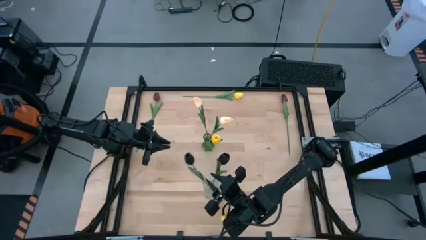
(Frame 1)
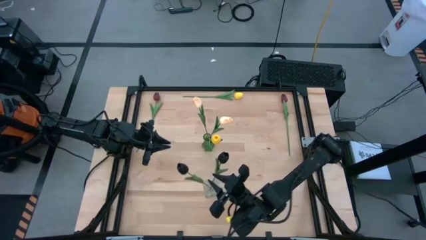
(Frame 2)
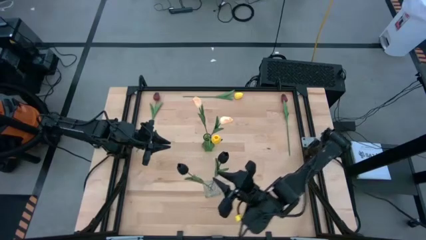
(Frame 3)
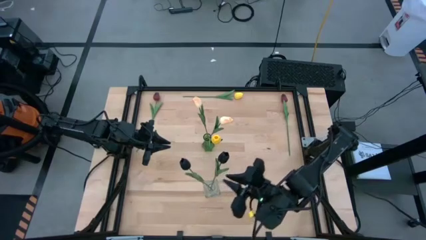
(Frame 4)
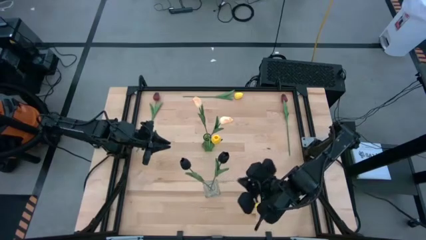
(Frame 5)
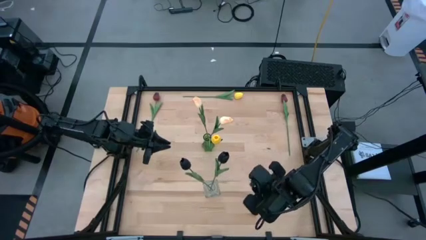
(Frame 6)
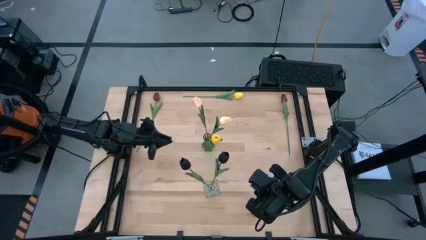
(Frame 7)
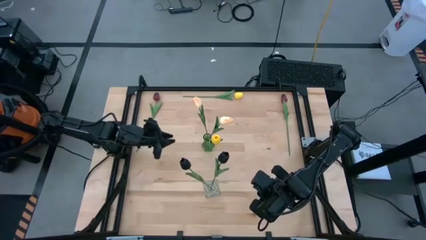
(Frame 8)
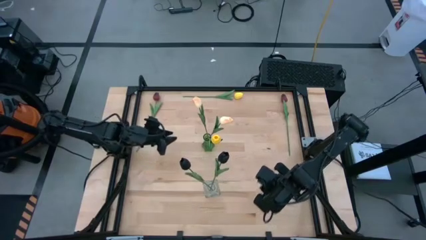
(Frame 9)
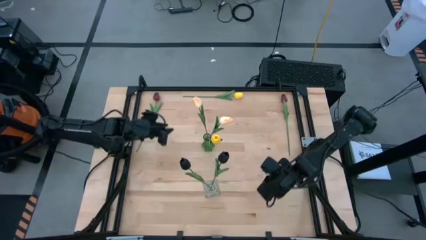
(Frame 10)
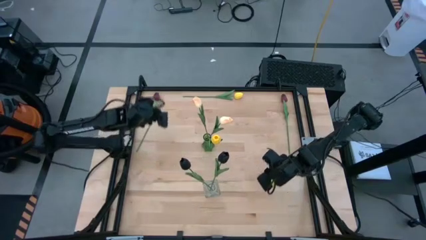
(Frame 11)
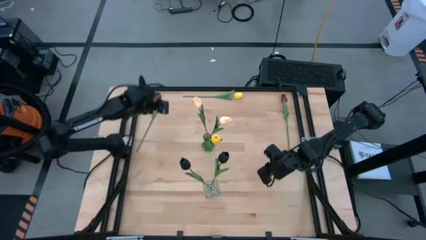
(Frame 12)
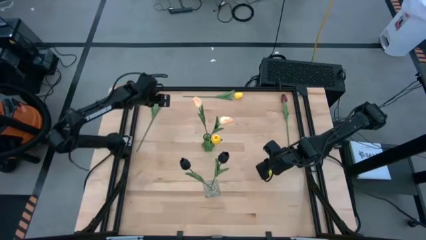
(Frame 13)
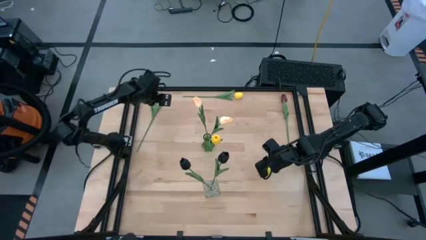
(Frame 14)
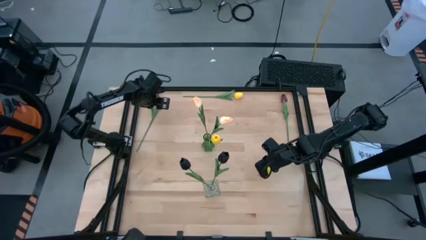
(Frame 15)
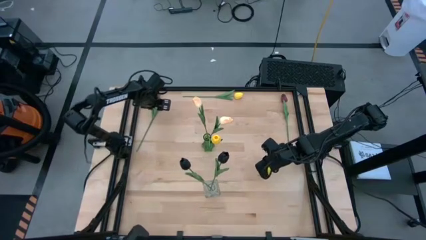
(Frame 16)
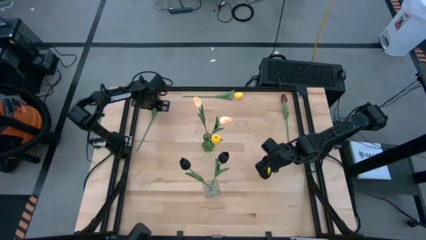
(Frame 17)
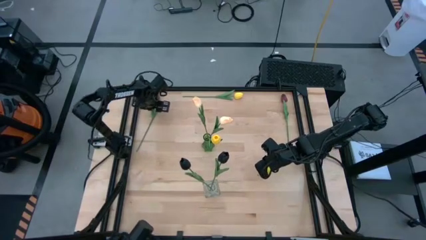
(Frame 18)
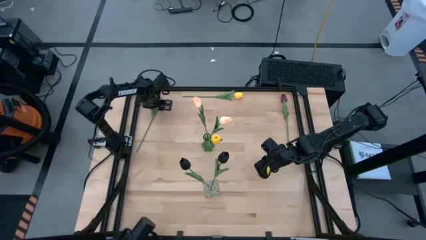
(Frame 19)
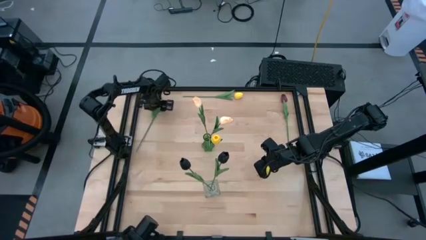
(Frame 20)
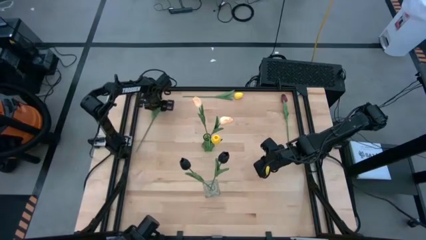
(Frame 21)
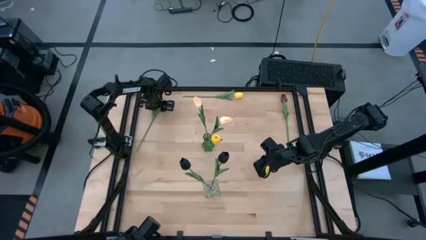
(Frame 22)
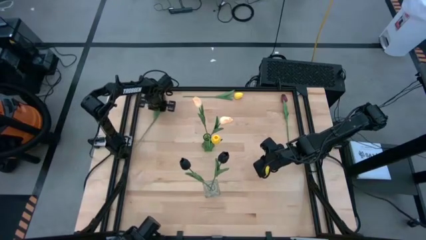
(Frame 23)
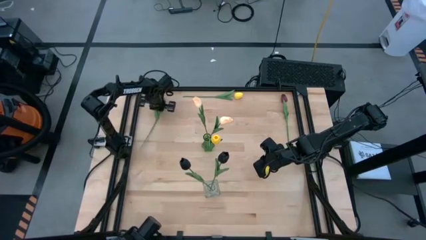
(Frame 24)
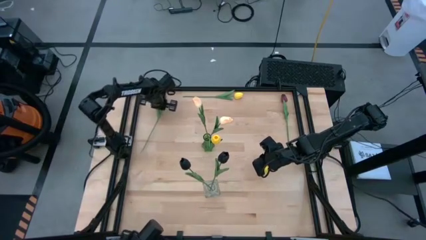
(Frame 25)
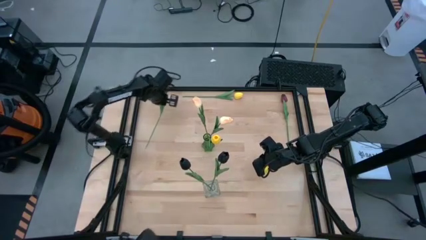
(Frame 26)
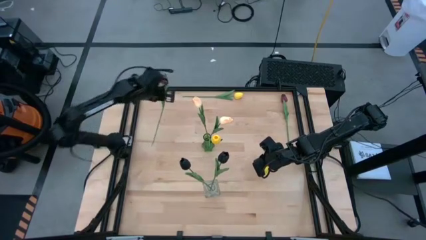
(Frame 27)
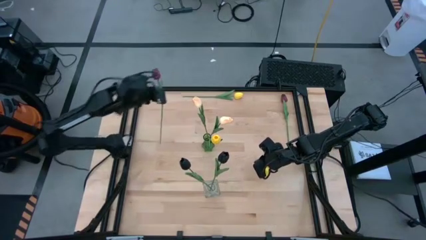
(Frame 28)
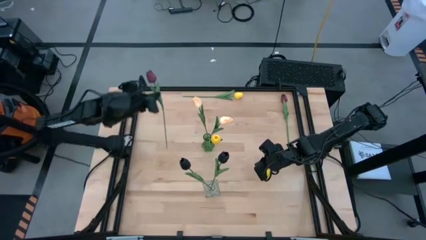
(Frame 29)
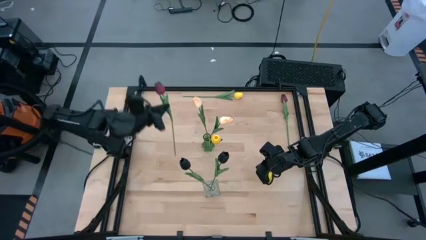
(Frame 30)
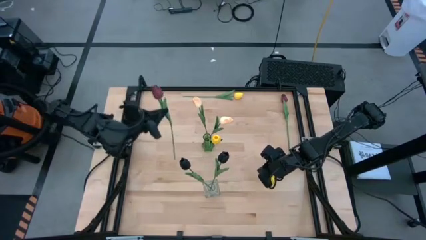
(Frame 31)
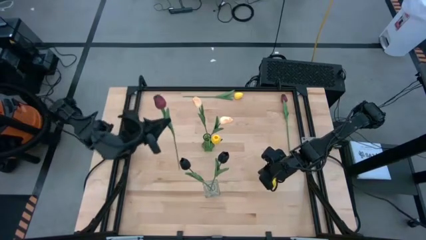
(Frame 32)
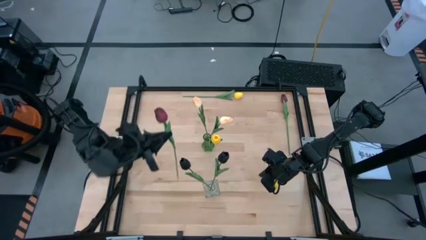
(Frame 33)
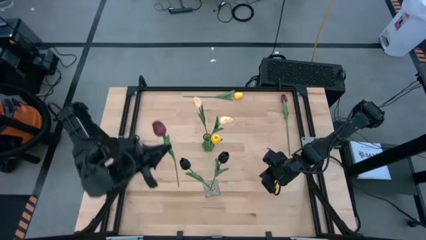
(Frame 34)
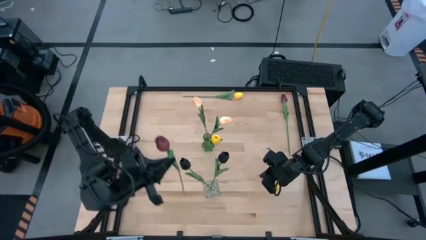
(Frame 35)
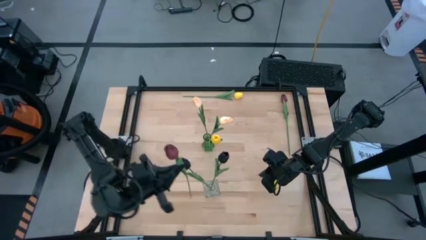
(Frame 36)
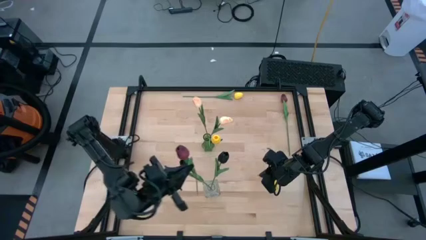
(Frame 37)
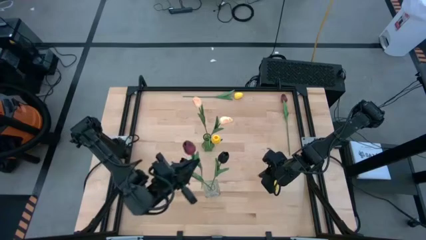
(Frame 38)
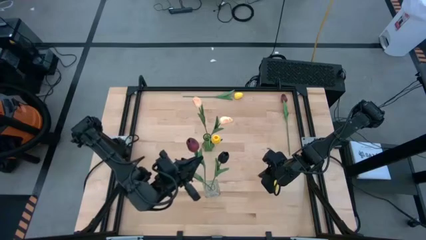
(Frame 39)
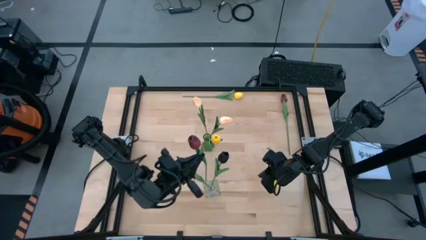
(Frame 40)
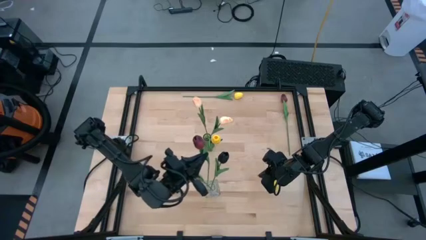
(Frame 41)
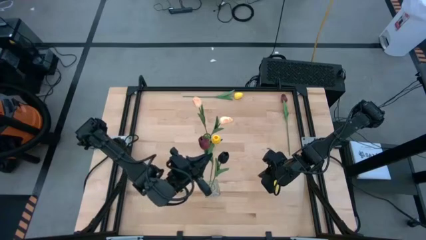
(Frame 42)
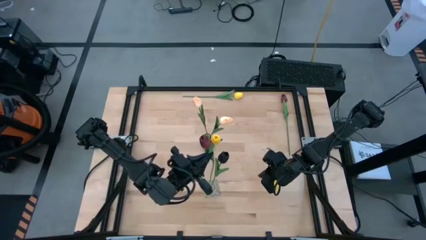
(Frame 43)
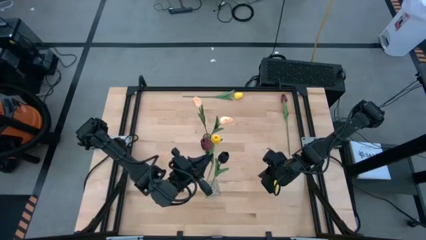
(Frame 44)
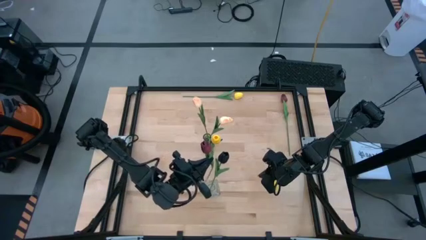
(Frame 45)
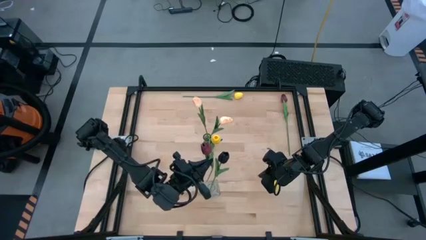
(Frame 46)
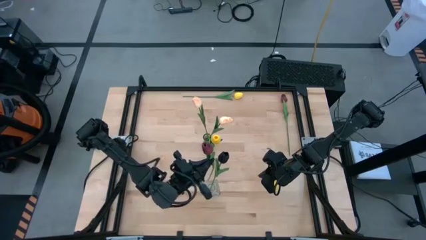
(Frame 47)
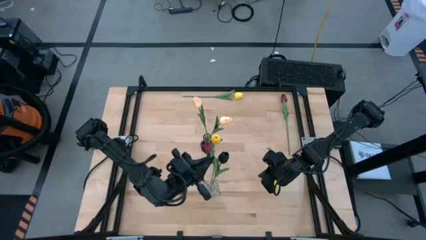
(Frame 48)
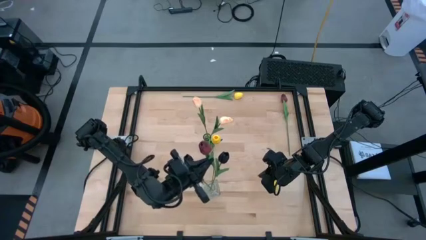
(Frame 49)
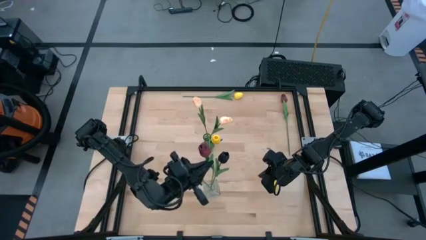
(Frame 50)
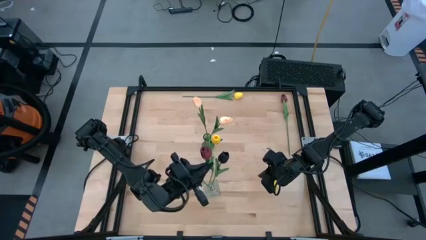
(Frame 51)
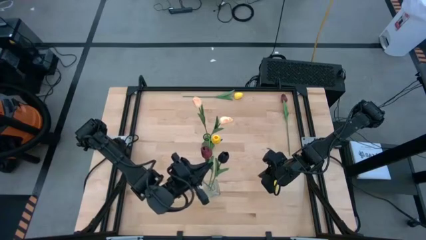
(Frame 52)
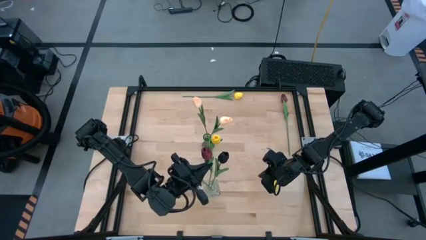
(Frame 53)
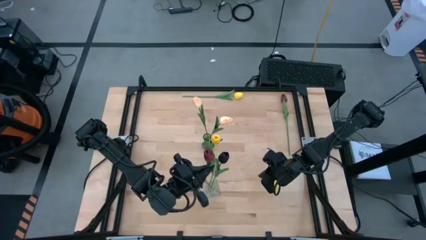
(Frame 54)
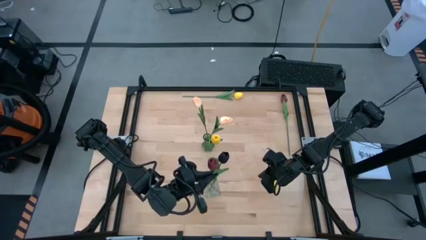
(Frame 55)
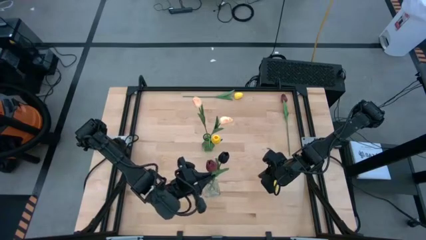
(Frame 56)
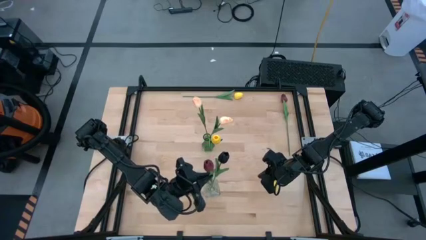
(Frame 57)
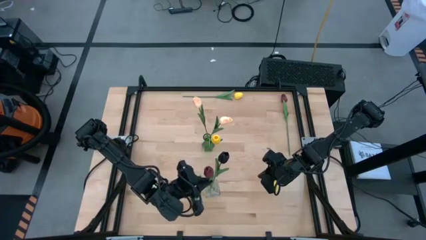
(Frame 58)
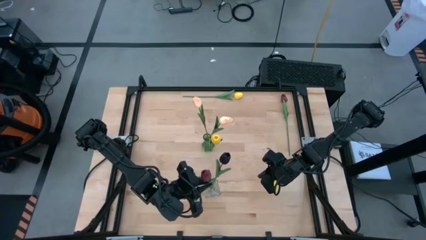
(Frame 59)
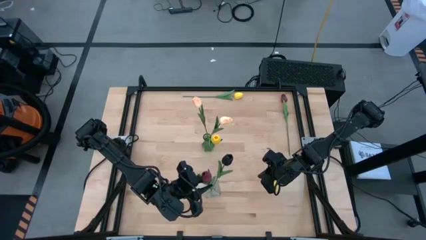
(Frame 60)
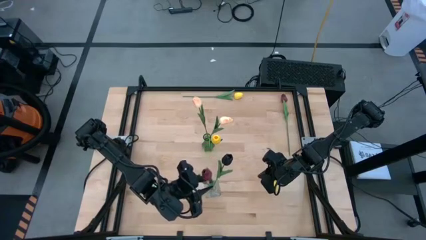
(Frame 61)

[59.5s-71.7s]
Task: Sort flowers into vase by color
Put the left red flower into the transparent vase
